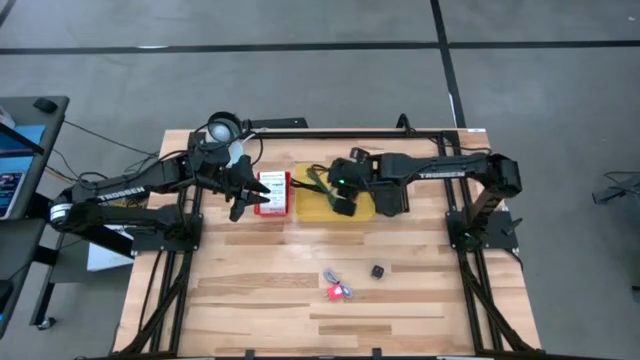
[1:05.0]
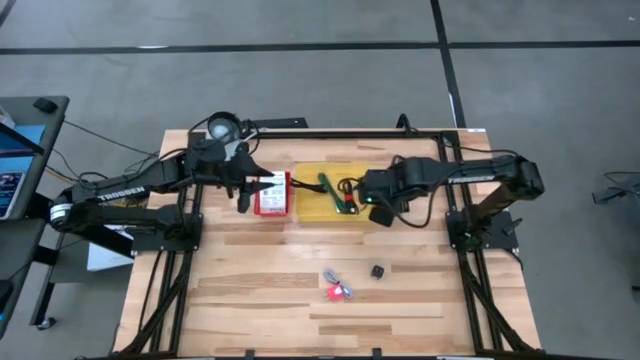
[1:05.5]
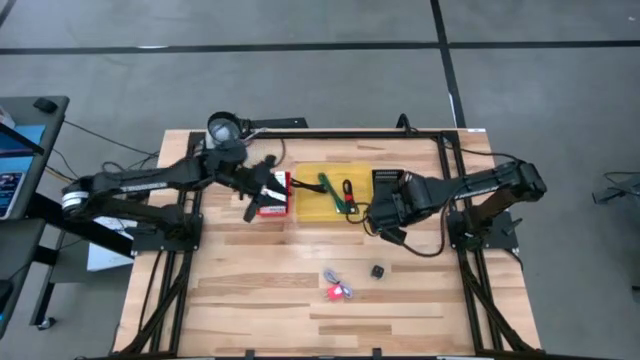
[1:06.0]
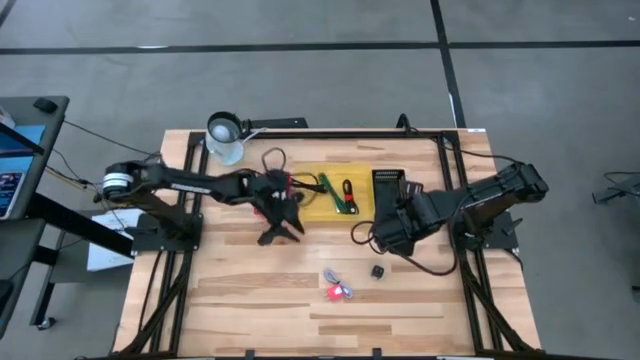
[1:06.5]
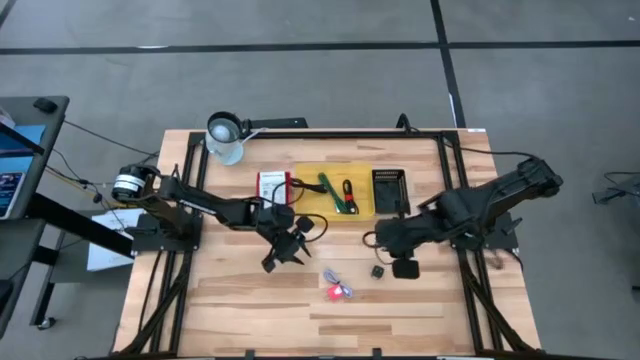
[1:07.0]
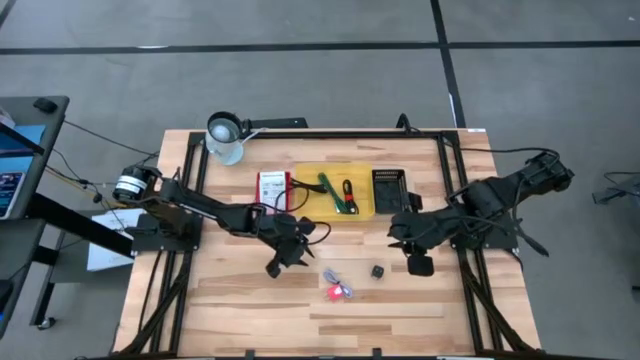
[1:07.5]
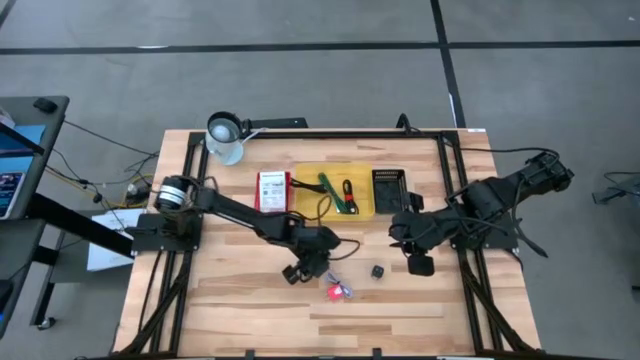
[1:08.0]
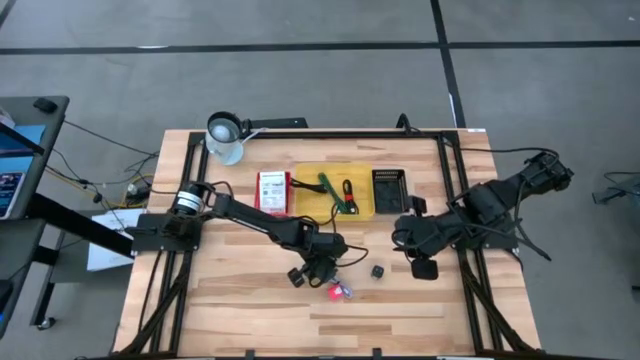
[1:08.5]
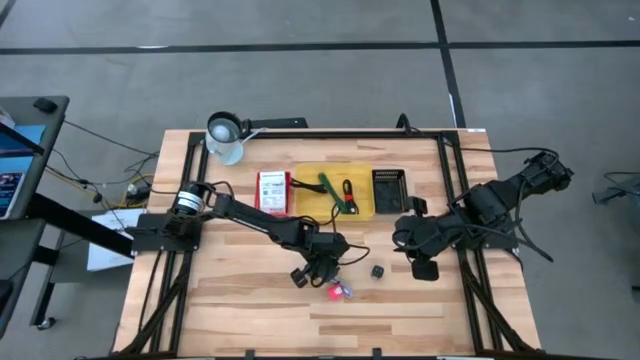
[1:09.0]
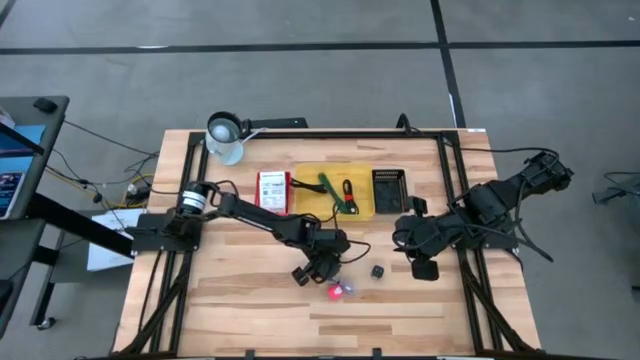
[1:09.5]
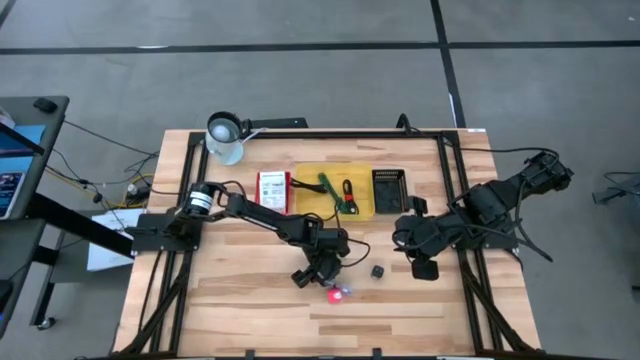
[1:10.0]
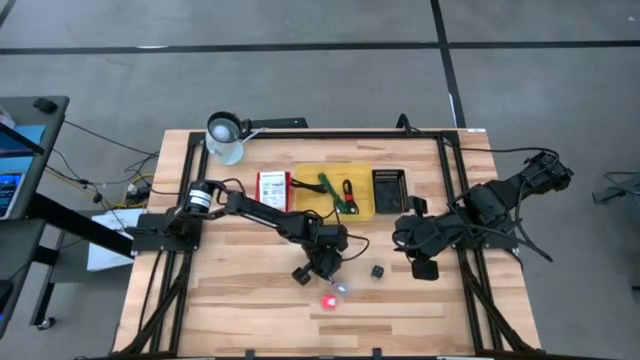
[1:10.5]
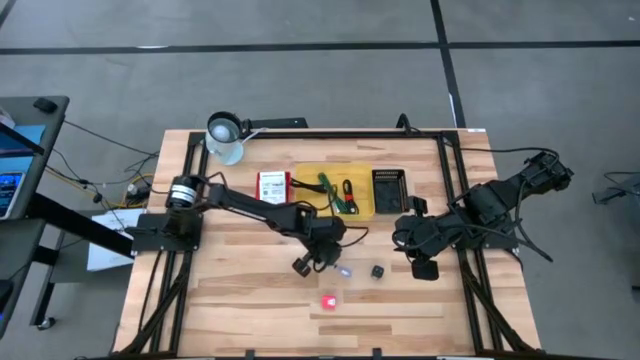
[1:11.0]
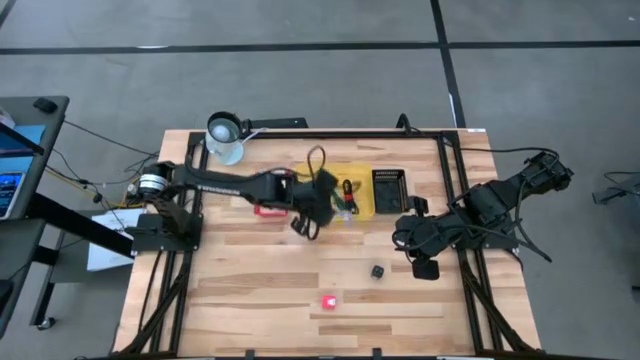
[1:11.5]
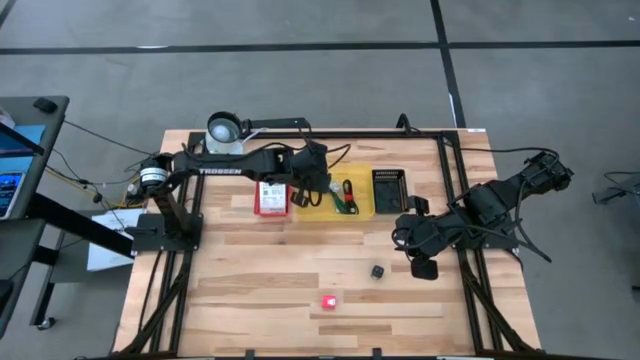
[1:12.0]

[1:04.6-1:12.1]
Task: Pick and place items into bin
Put the light blue charger cable into the yellow bin

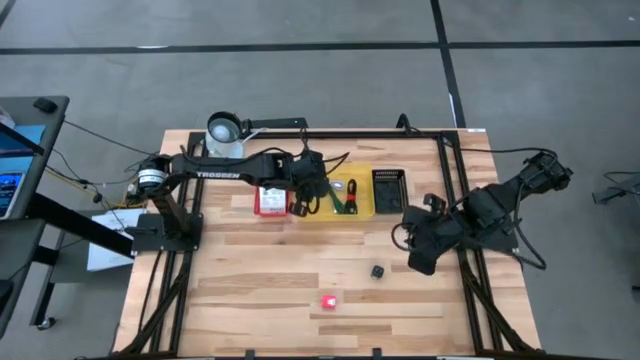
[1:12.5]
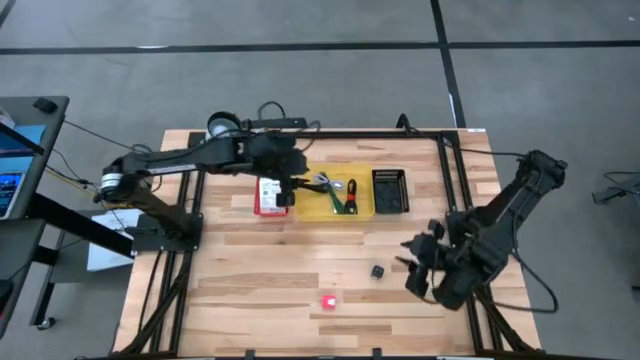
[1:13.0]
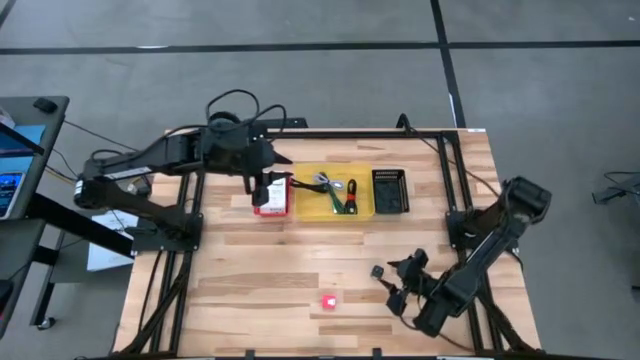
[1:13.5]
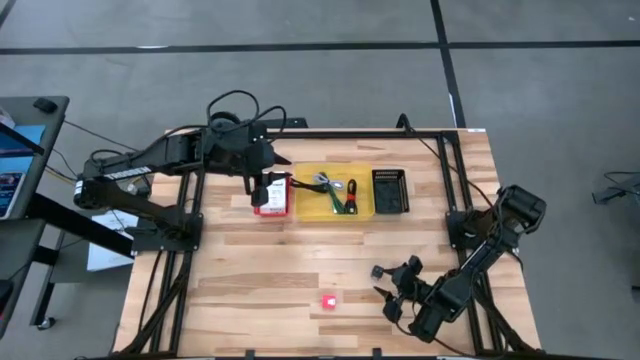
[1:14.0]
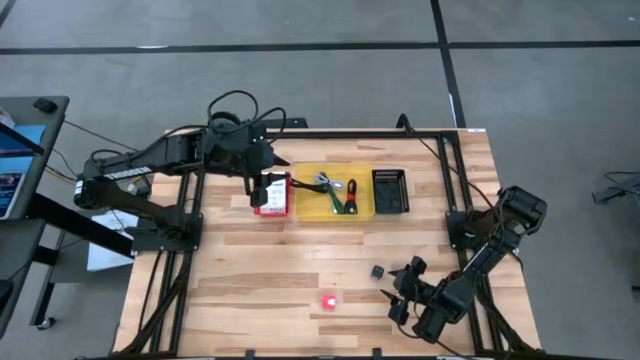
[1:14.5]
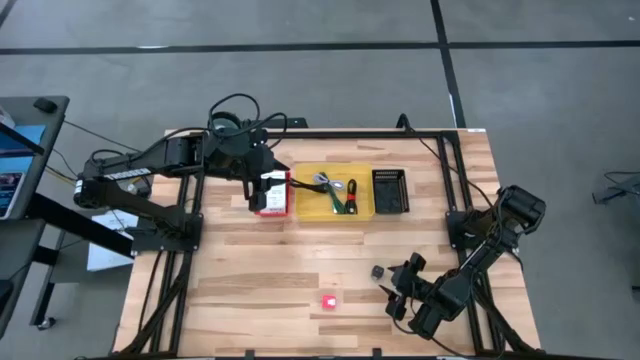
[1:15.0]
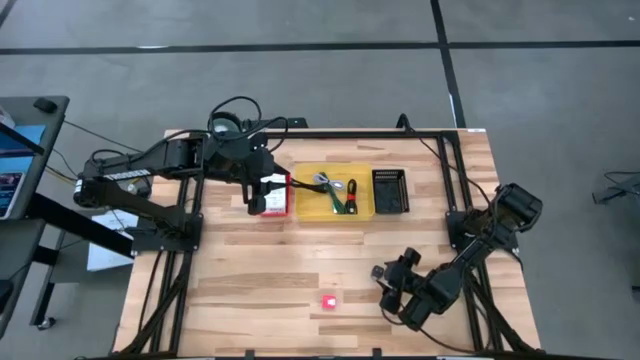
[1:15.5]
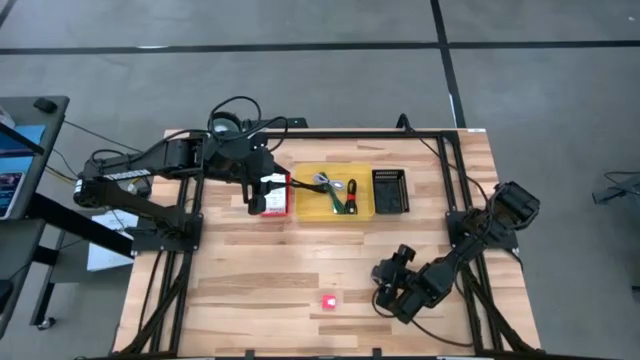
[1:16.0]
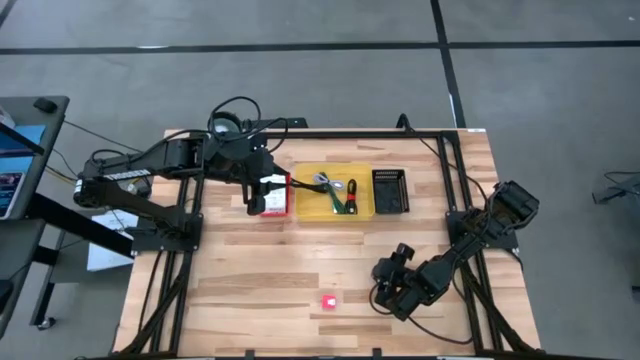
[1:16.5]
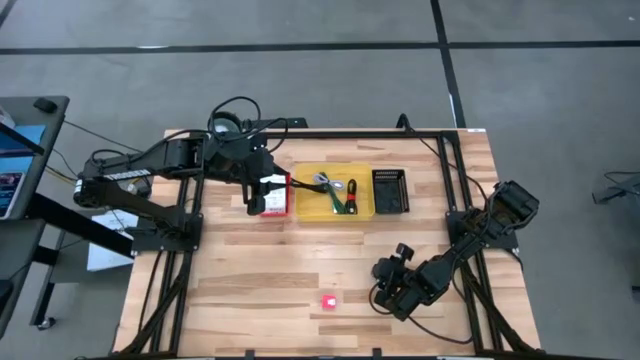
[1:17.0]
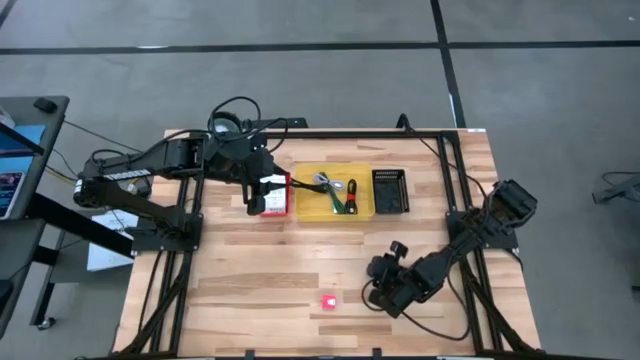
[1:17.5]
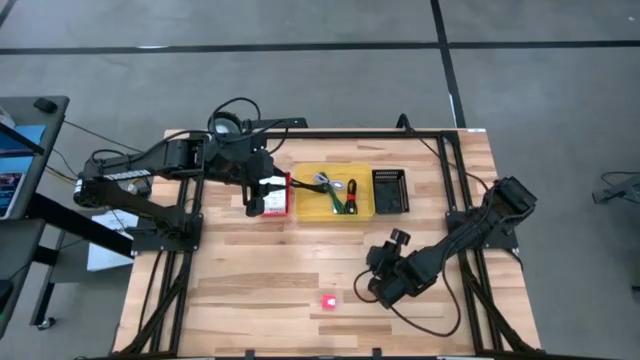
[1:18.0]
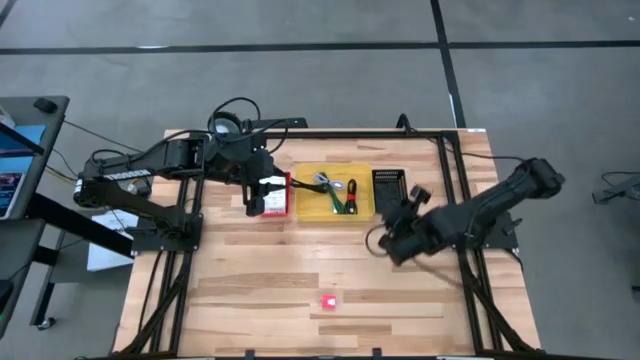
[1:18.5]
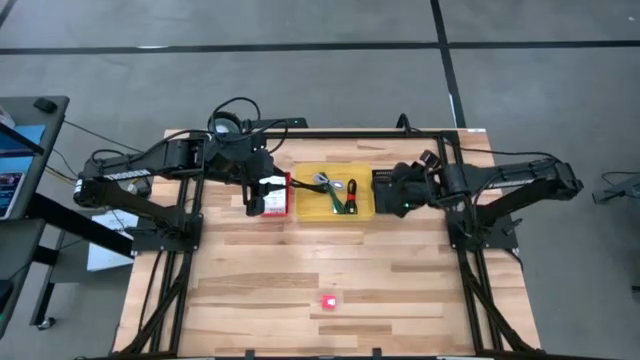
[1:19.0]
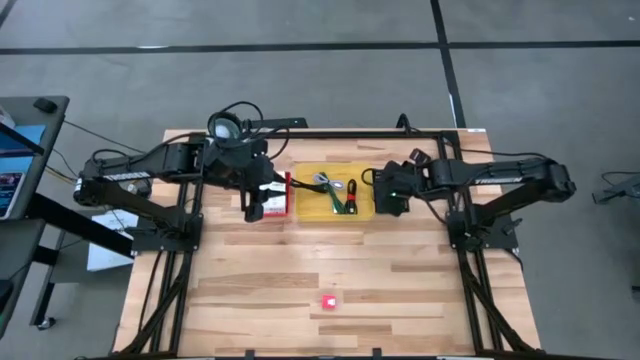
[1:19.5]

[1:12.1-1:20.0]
Put the black charger adapter into the black bin
